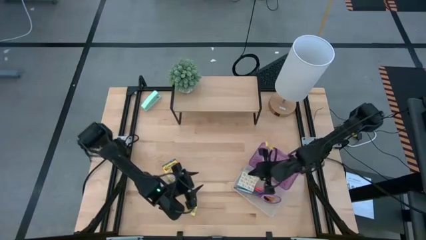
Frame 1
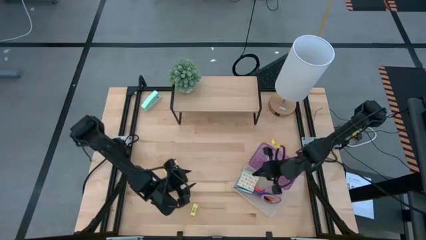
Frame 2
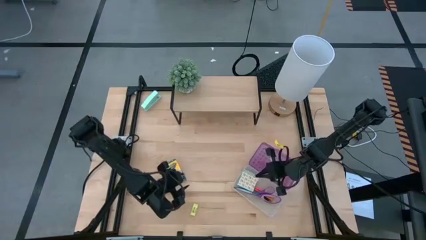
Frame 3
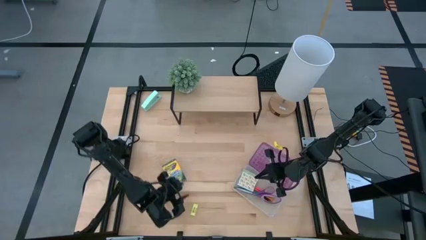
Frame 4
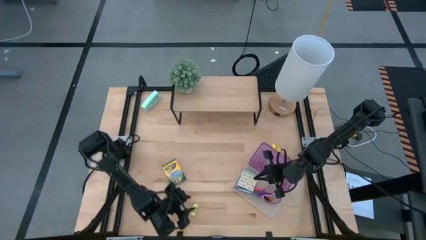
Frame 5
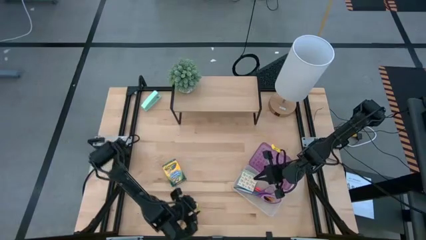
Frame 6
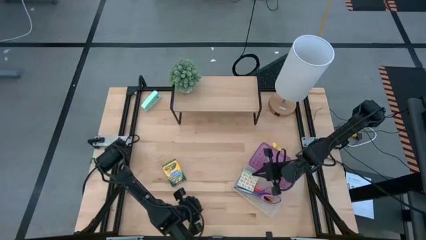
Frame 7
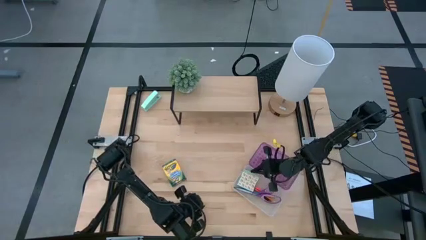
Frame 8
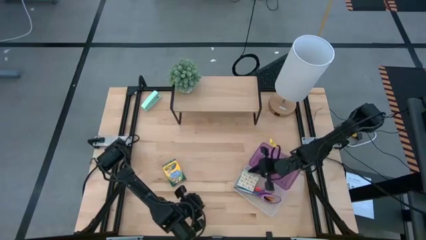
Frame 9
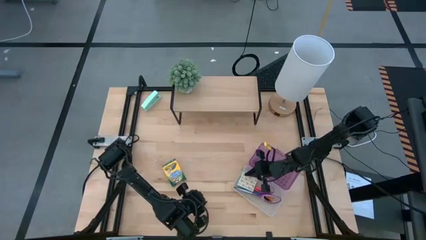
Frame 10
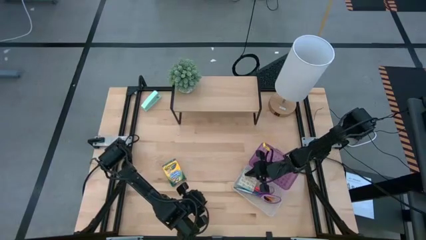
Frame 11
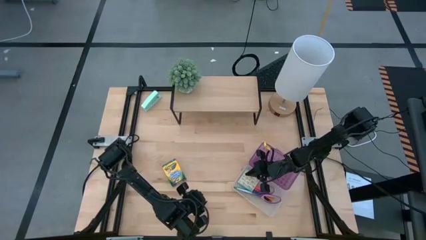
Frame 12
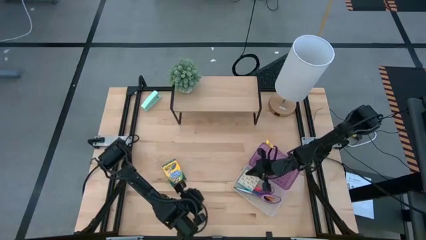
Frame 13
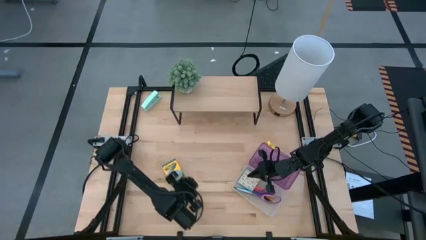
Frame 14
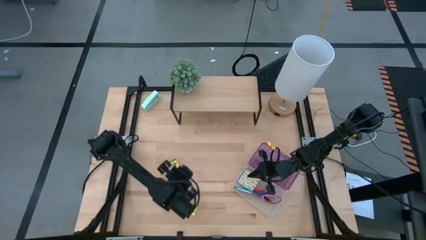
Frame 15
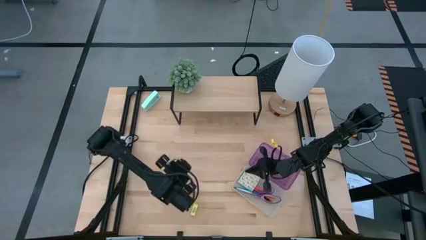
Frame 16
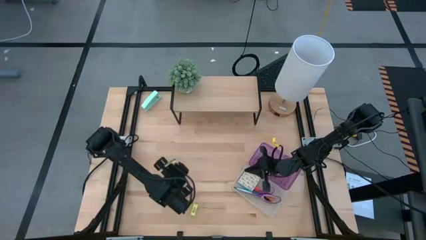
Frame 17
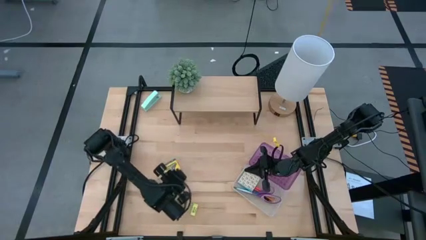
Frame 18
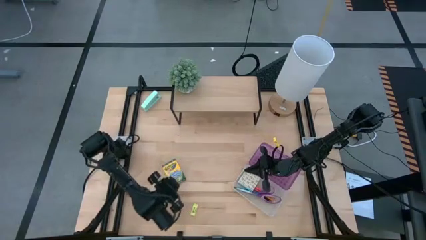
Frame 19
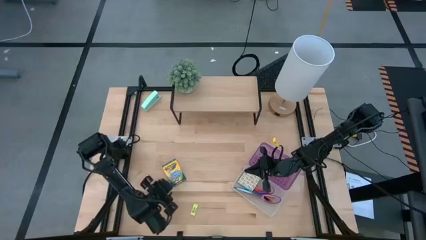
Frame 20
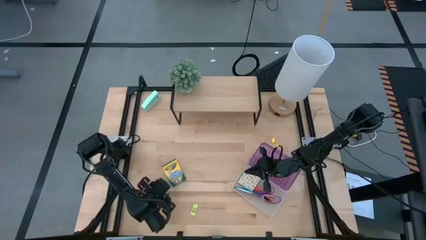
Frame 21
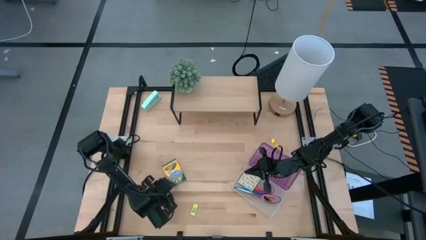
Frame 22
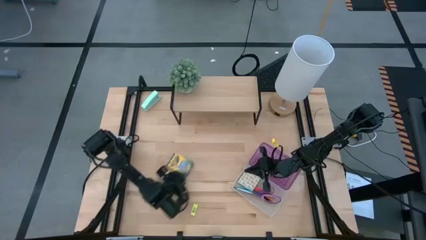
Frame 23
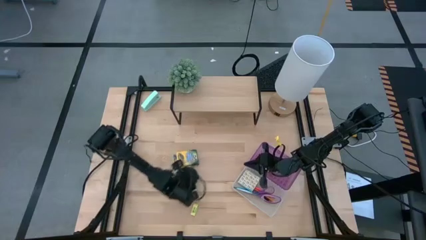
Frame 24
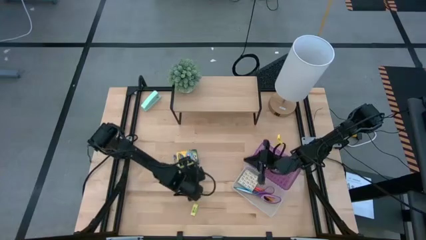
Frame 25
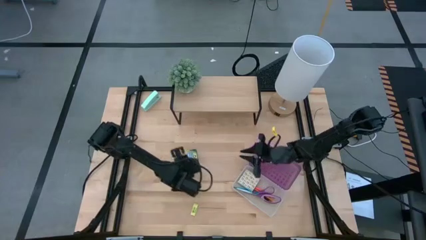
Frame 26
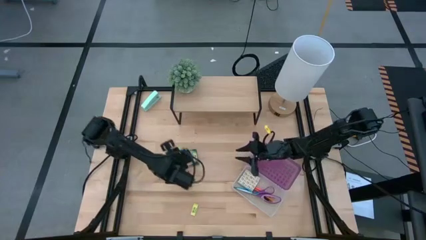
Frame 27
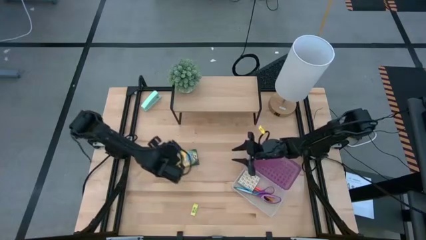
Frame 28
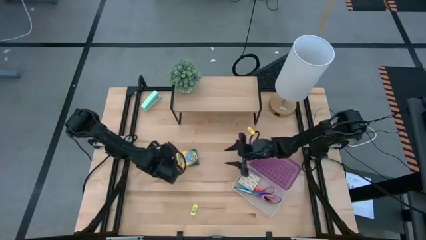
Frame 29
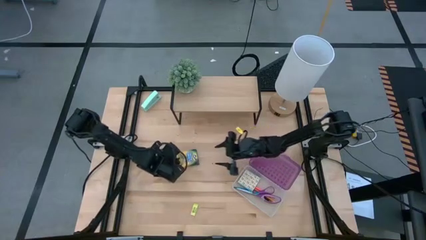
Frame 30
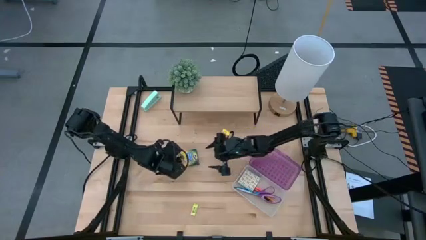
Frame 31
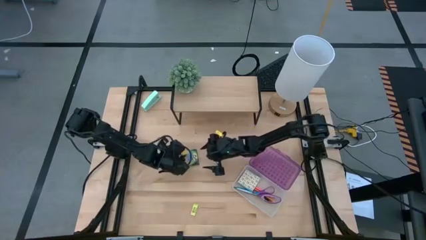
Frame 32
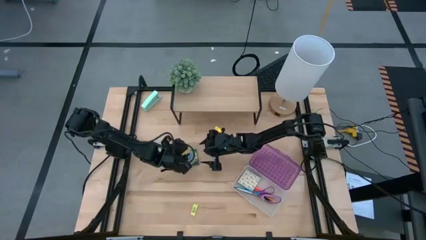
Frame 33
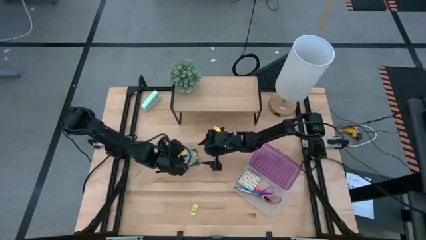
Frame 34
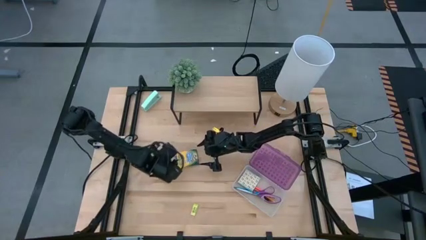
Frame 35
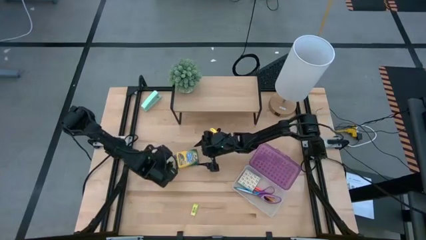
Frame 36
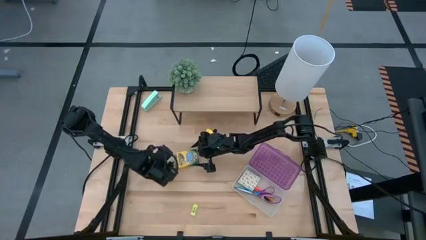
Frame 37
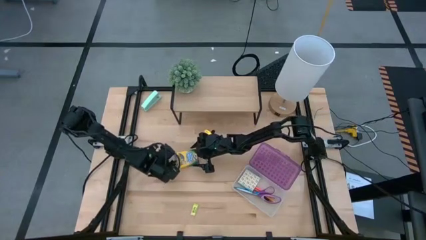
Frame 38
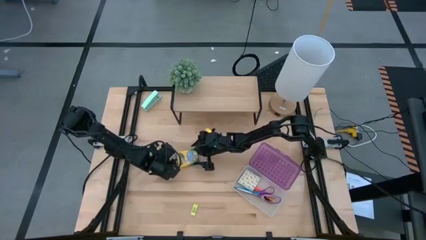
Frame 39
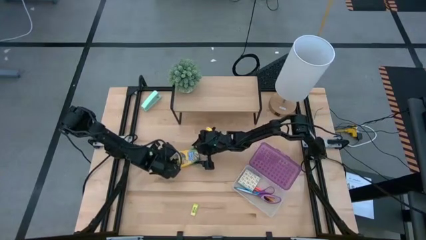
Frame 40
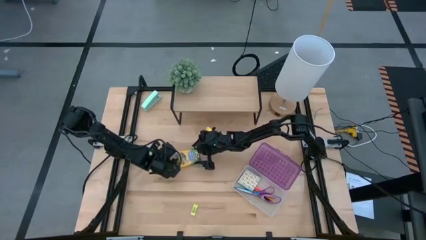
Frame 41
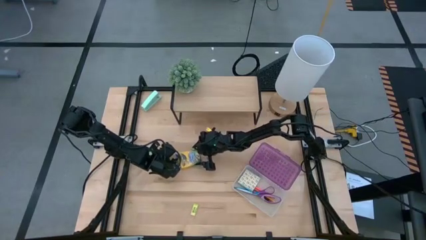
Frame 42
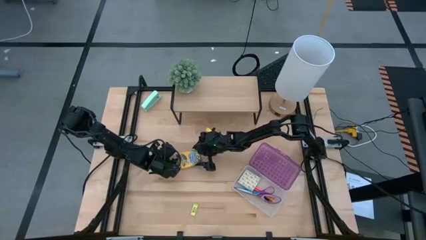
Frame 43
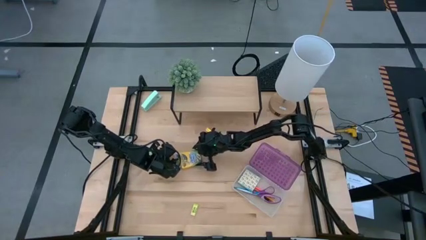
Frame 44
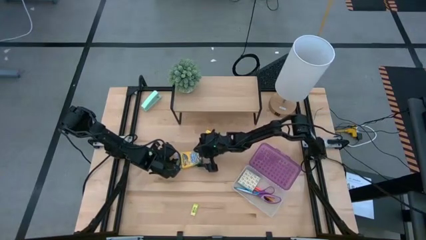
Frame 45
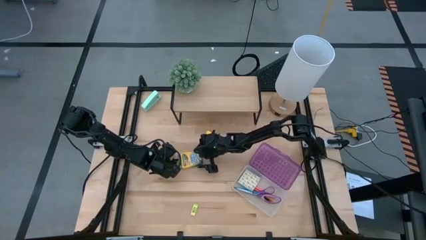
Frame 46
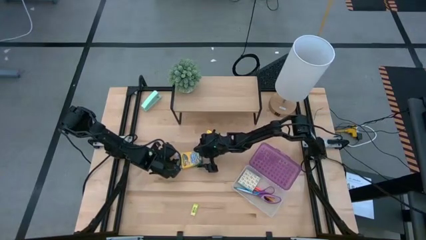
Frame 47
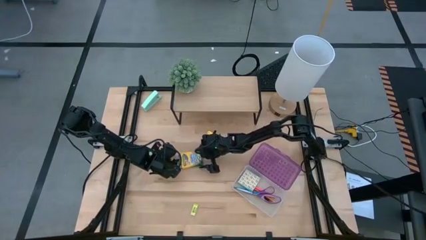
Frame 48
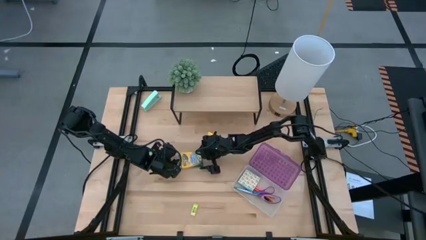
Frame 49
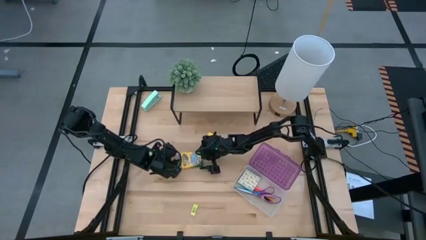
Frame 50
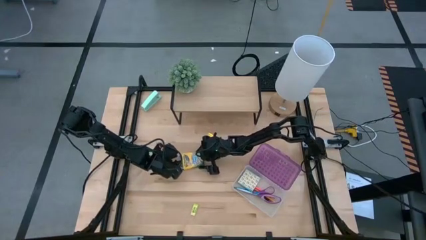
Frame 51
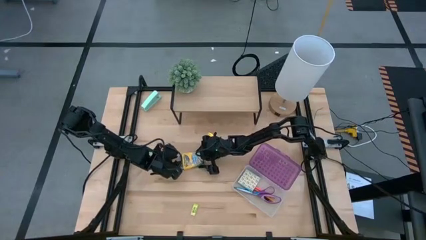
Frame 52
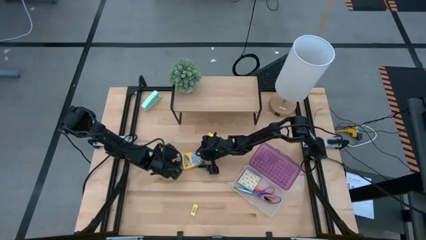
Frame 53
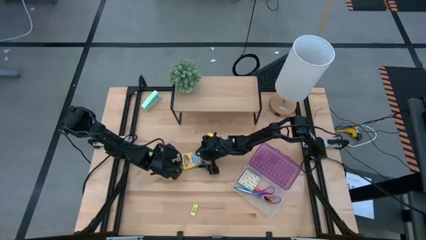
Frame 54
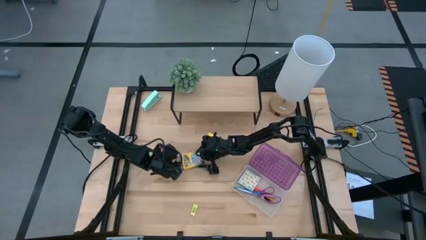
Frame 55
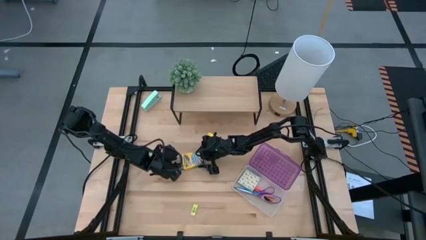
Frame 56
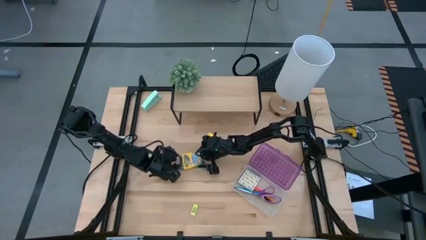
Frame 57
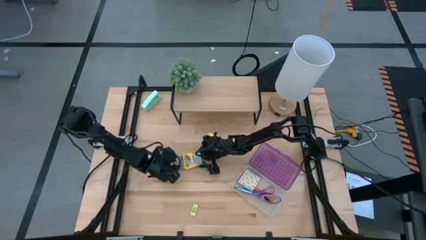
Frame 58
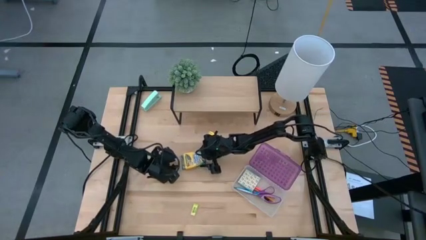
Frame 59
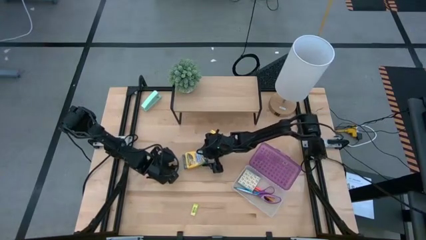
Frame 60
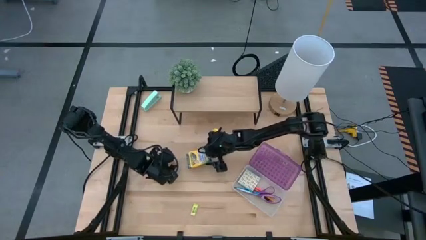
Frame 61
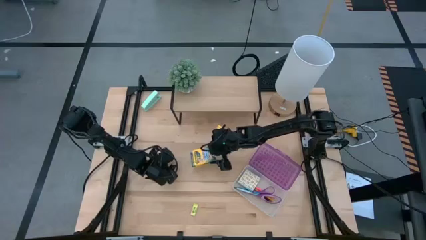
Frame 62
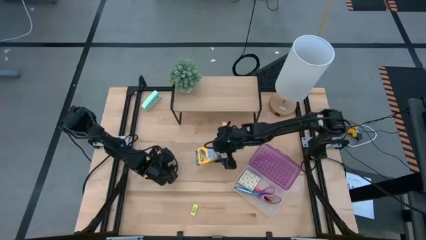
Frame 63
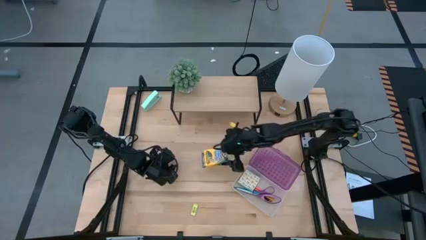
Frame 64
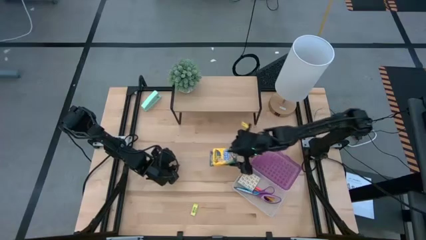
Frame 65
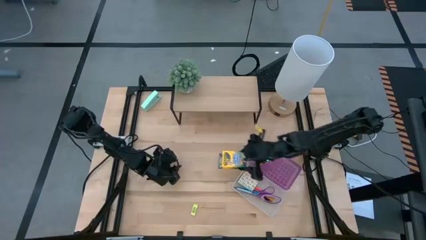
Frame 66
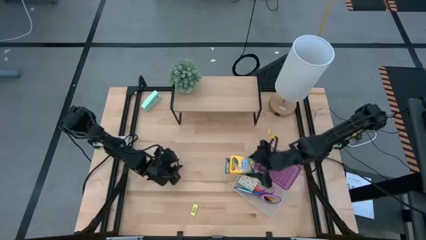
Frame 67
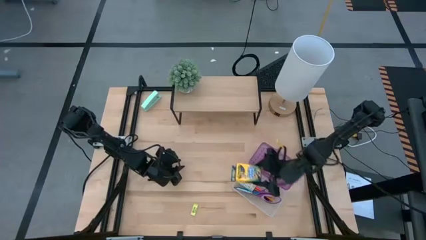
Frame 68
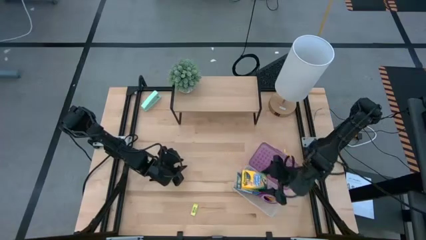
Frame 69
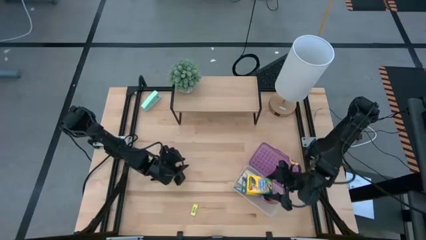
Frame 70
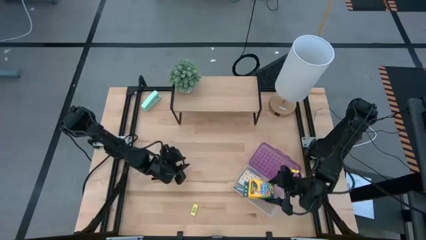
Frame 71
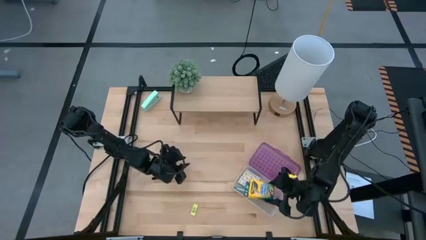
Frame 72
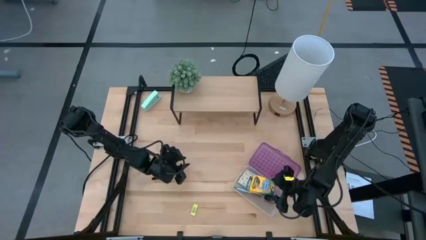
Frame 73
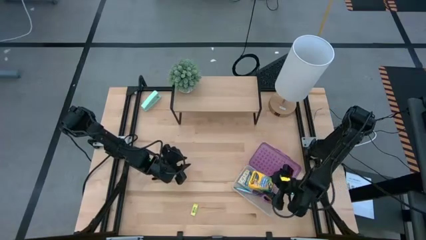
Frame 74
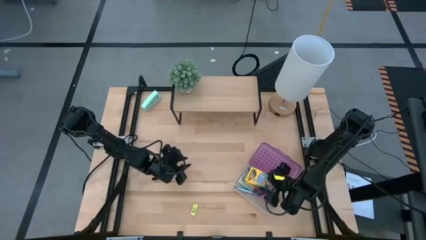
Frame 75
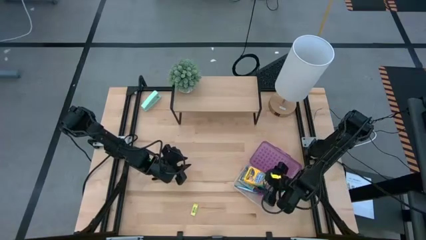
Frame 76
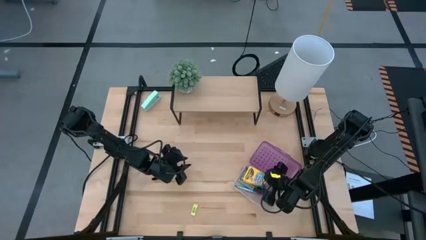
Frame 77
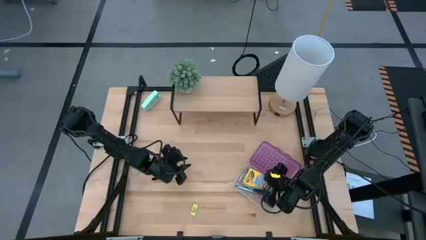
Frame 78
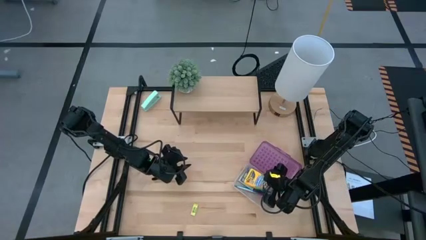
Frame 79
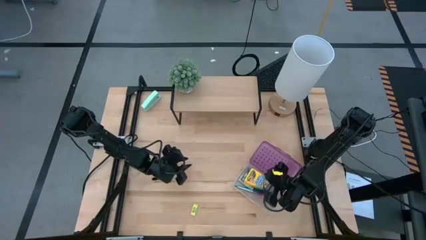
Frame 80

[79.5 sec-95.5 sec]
Task: Pack school essentials
Put the yellow crayon box into the purple supply box
